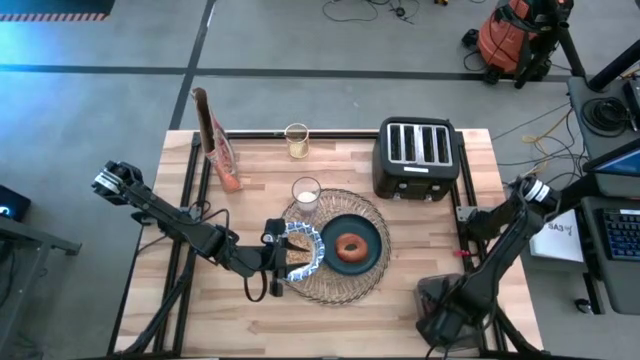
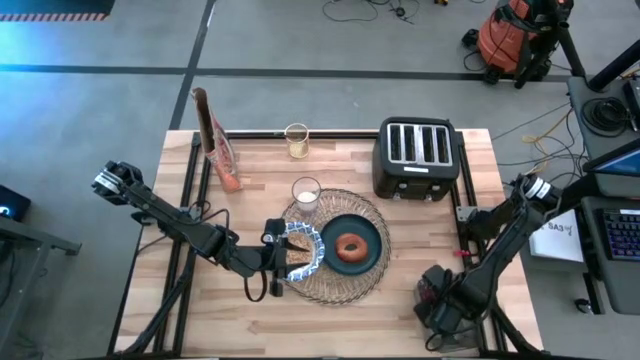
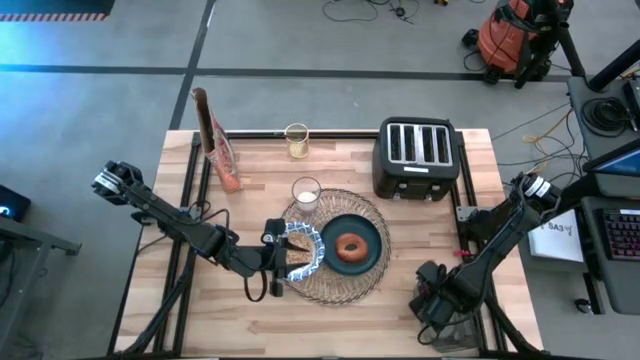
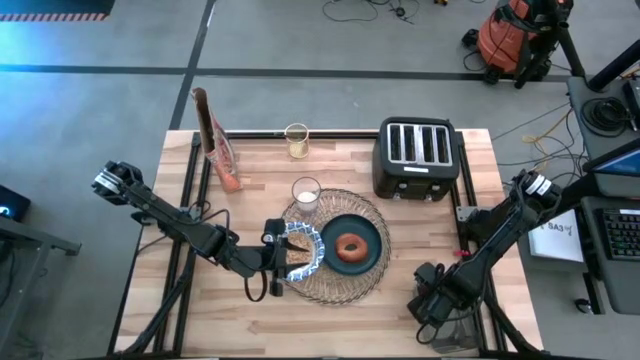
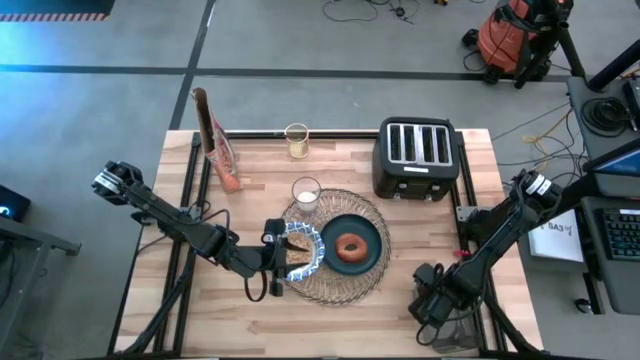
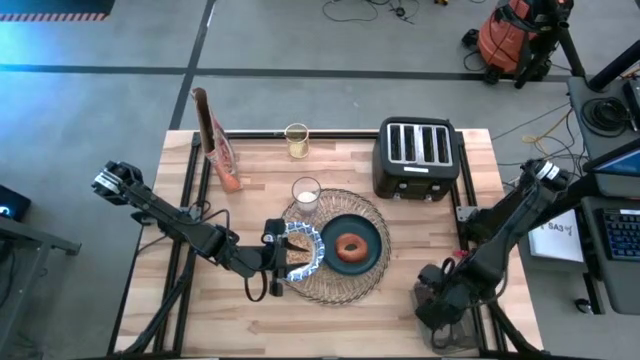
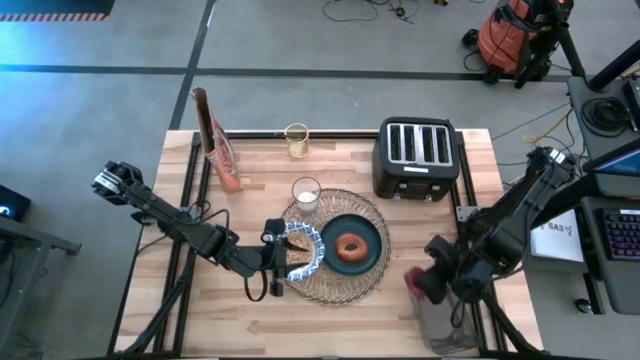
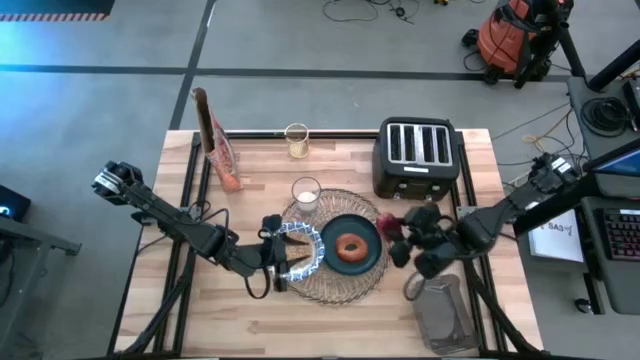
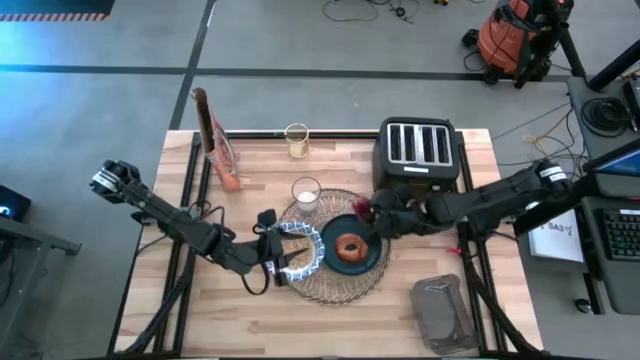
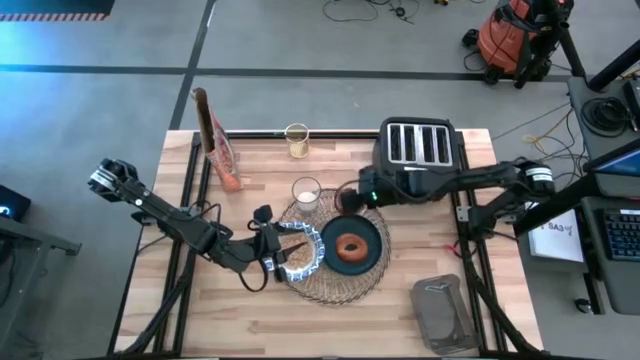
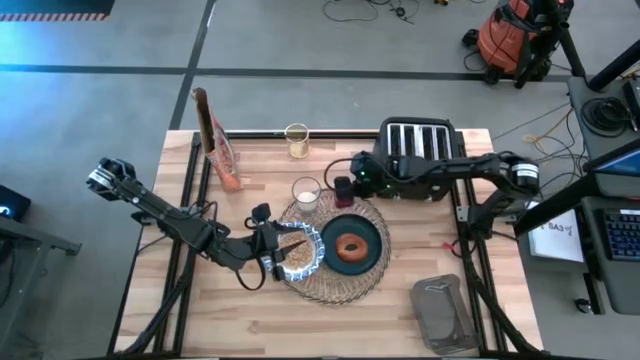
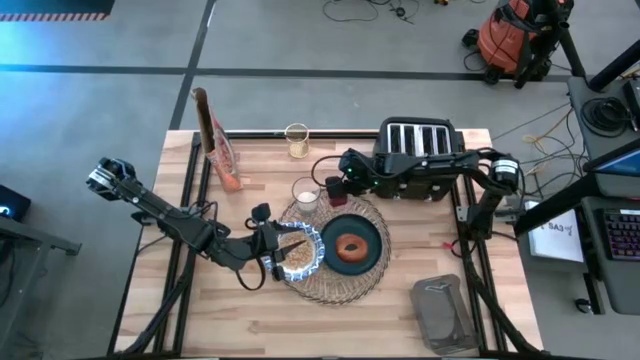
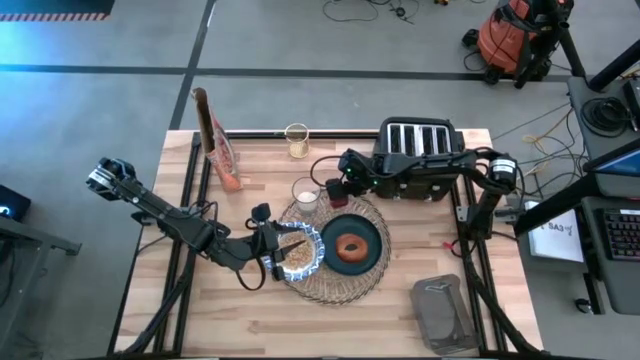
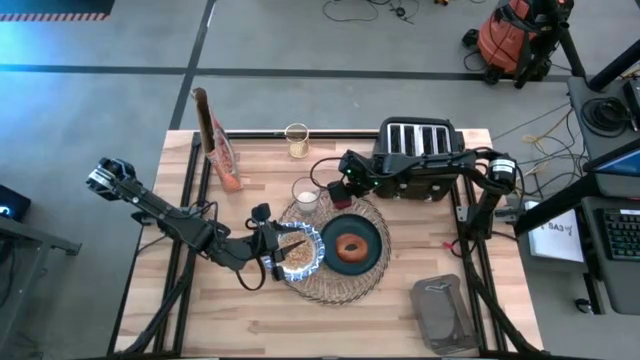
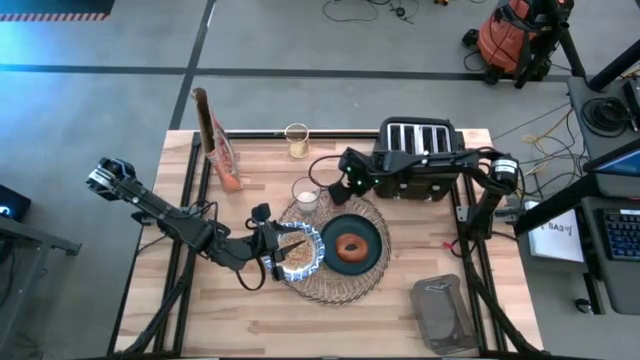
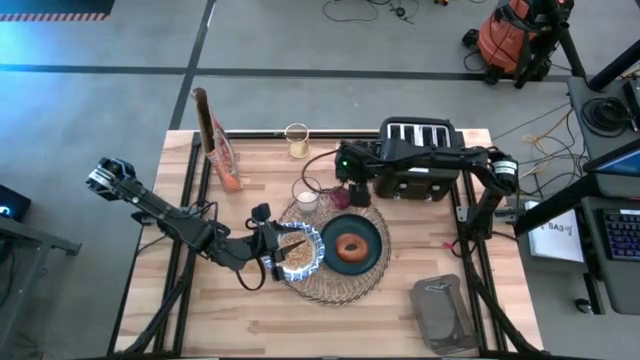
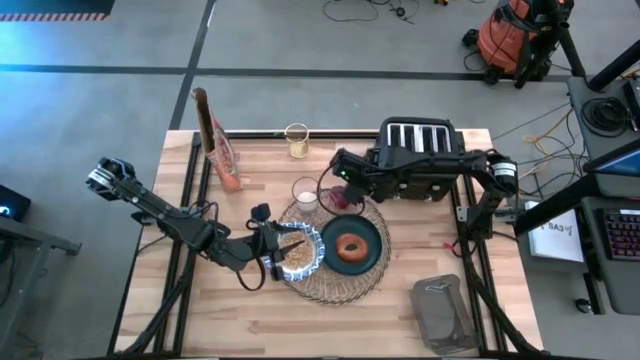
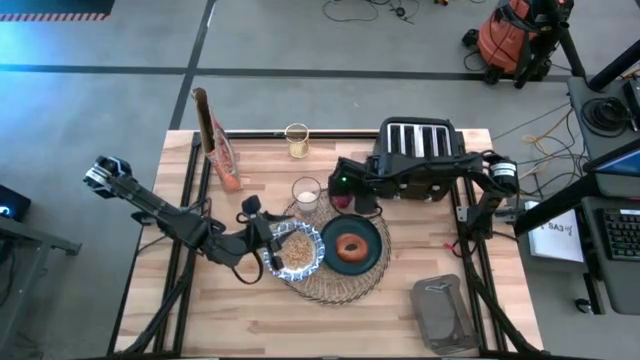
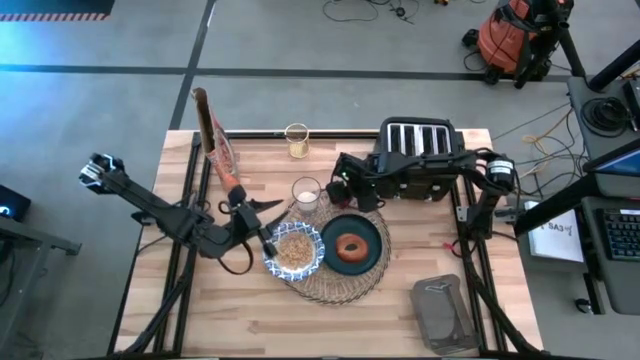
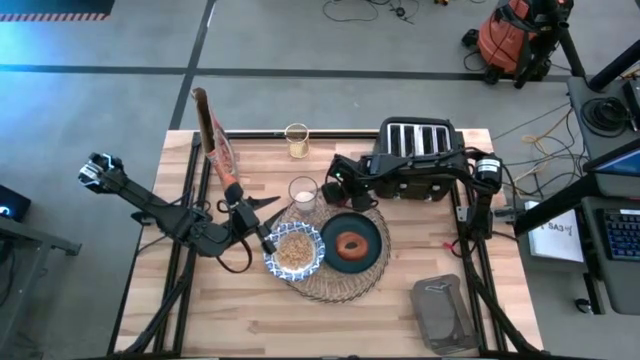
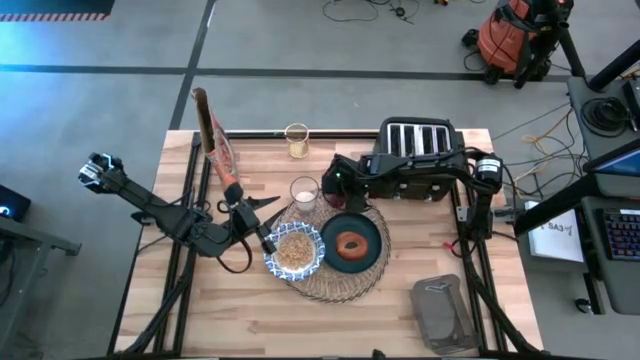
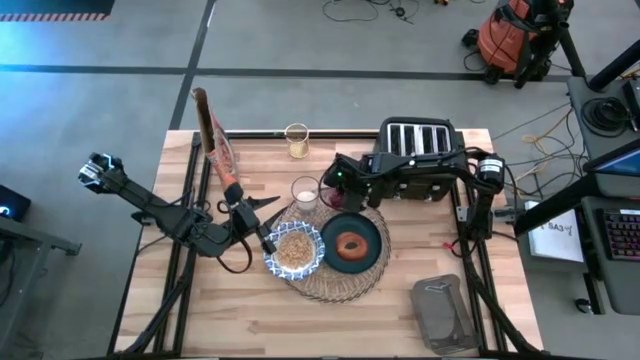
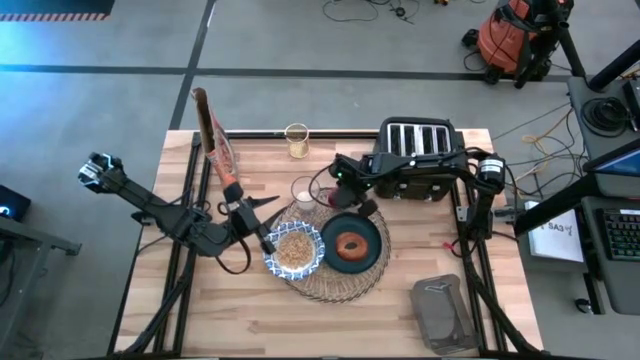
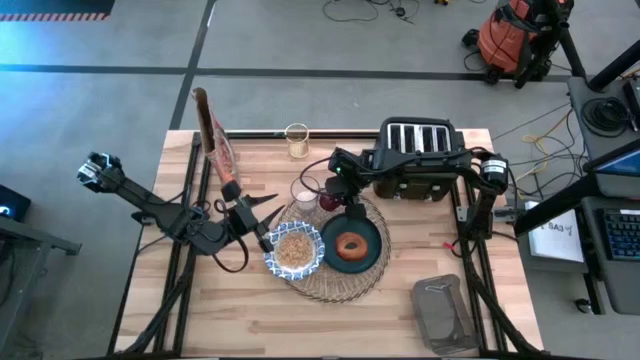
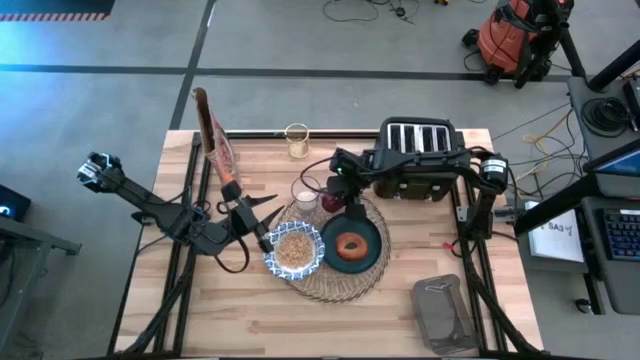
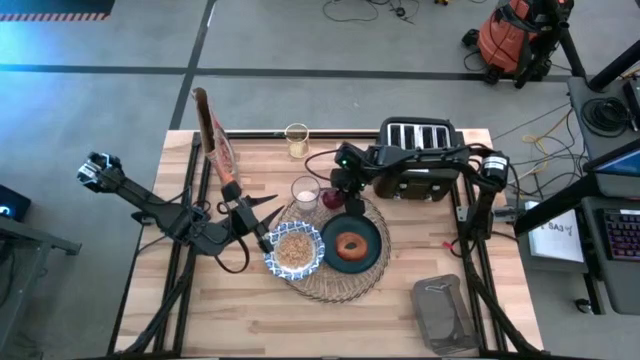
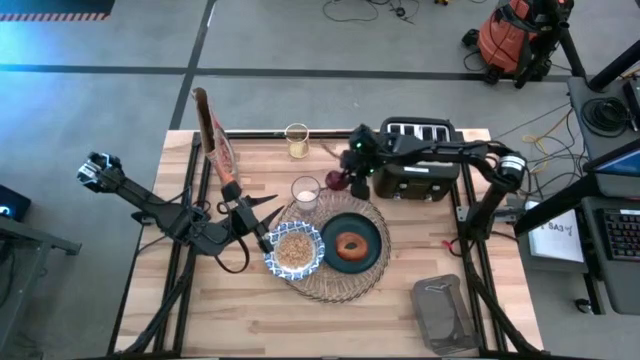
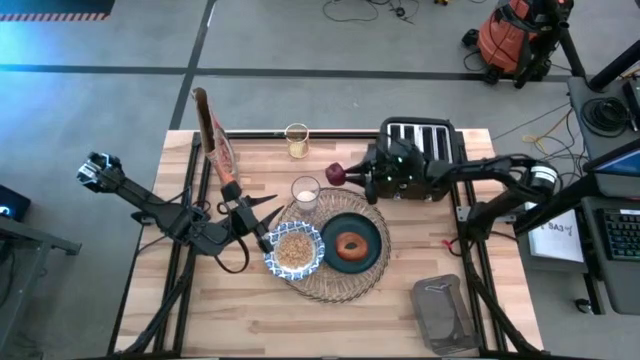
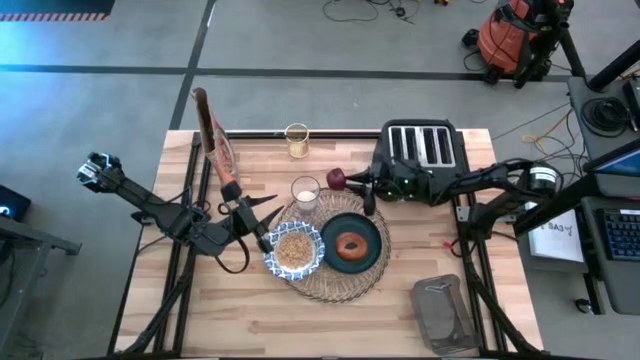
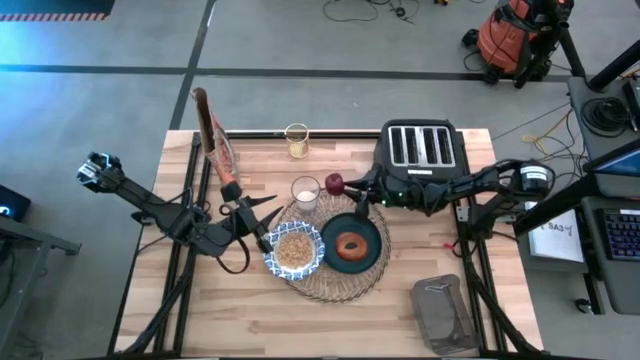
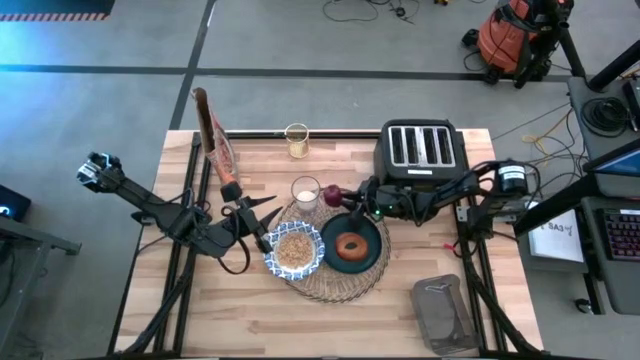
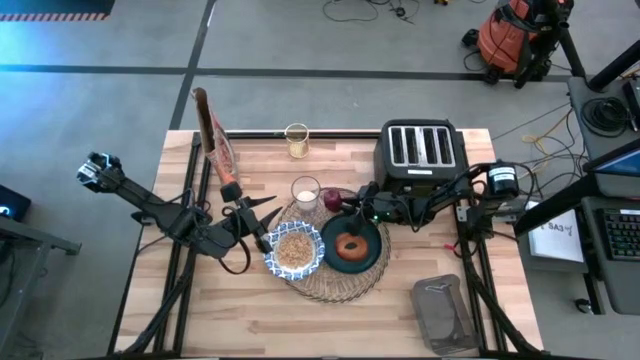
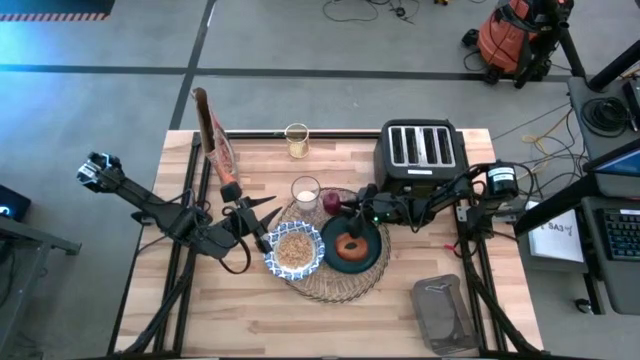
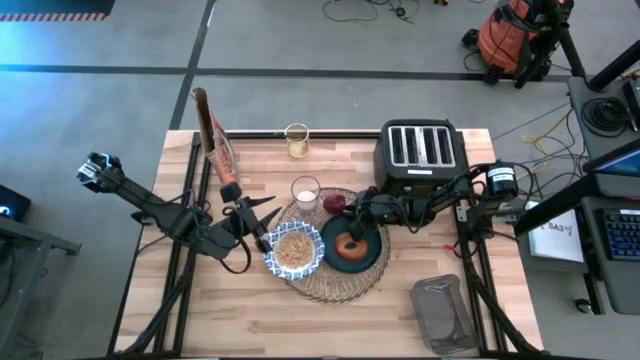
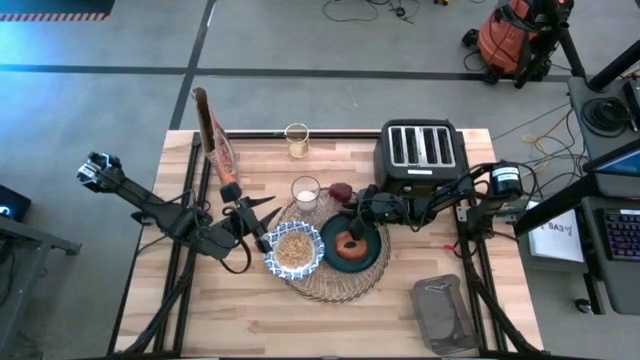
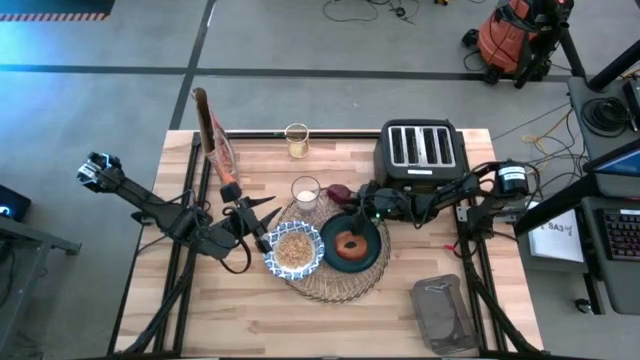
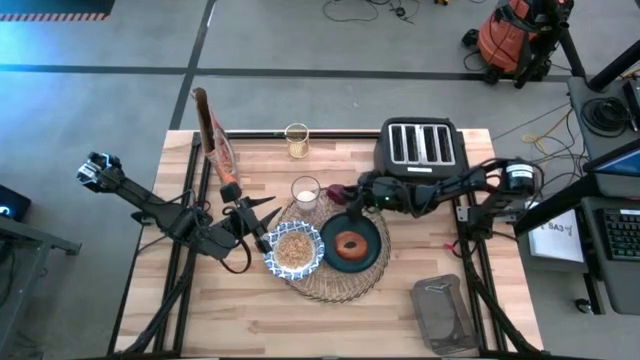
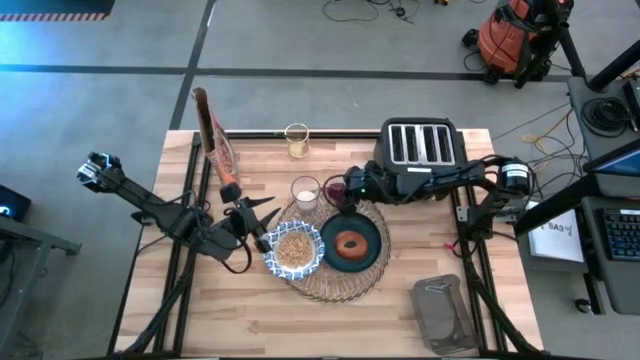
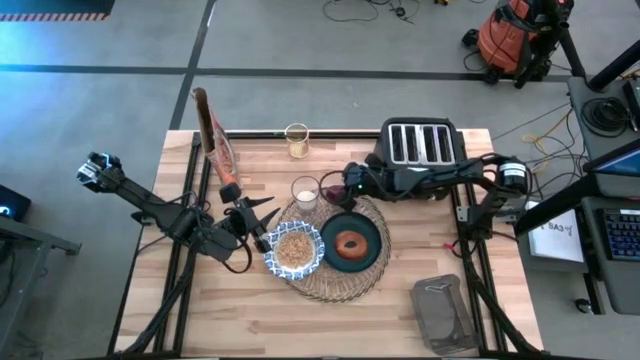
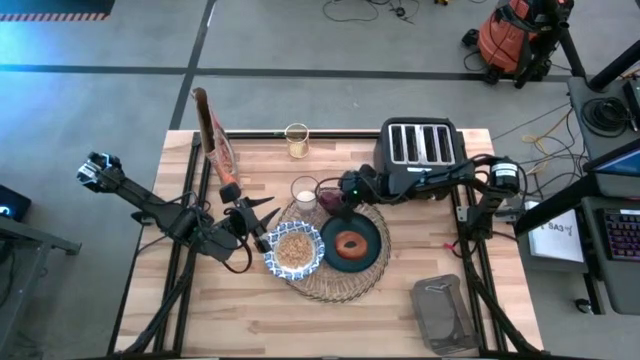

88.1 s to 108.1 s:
Task: Arrange a breakfast setting
Put the red apple on the brown placemat to the right of the cup of milk

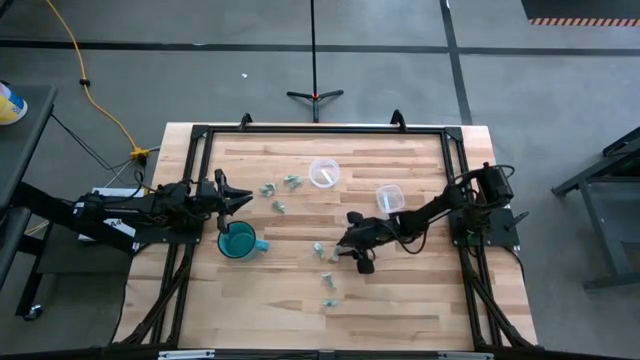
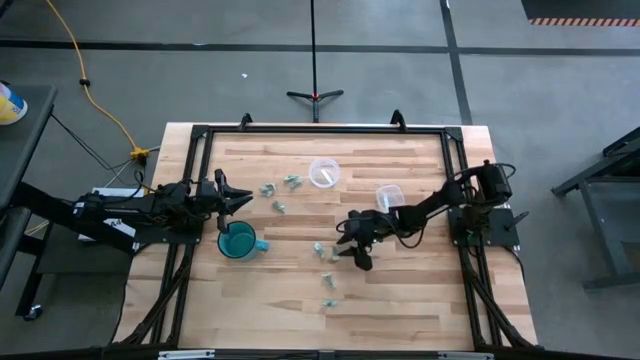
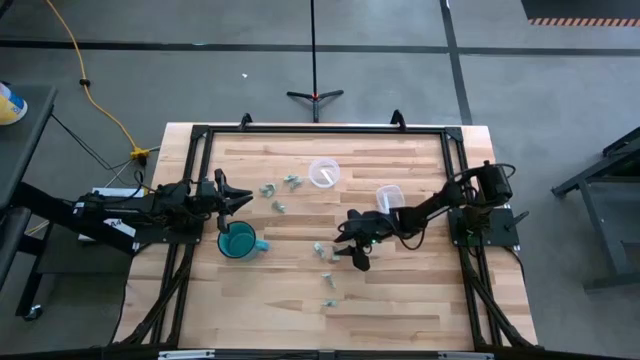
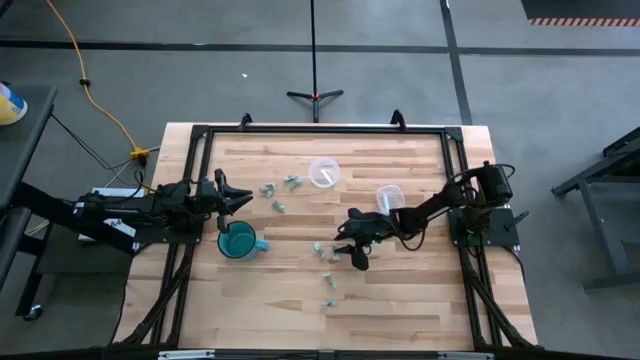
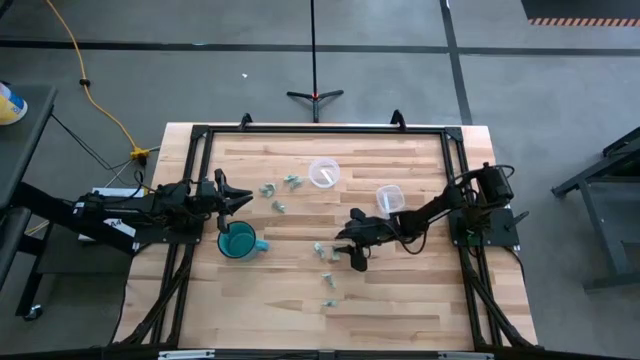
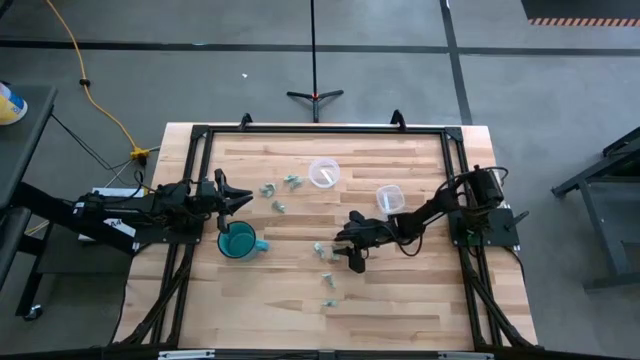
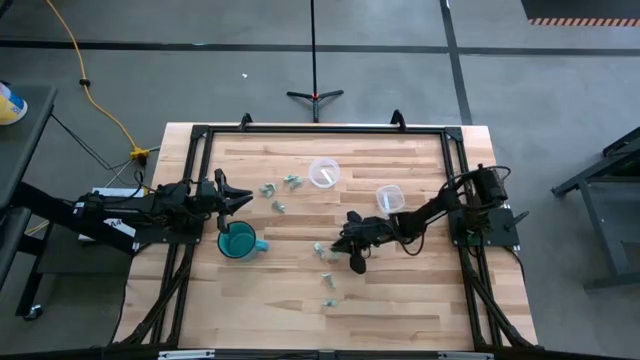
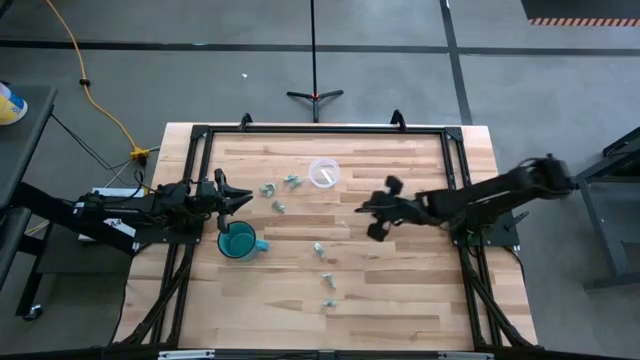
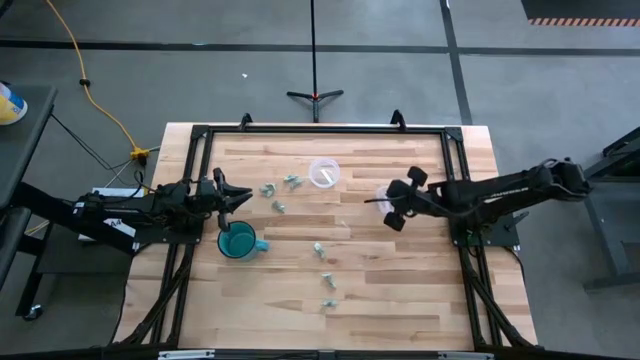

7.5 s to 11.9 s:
Task: Pick and place items into bin
Put the stevia packet into the bottom transparent bin
